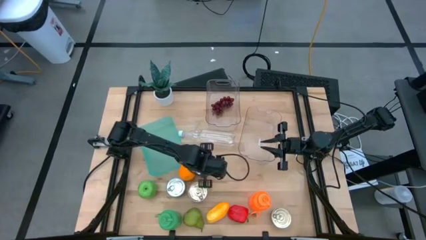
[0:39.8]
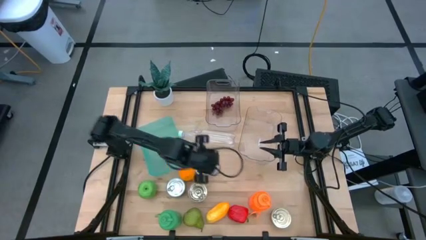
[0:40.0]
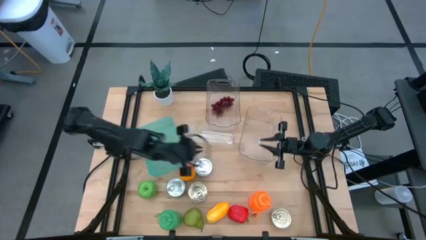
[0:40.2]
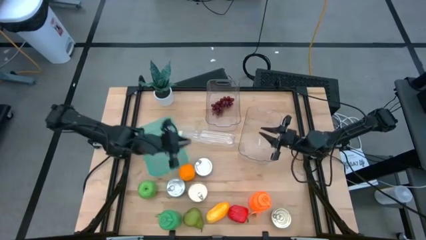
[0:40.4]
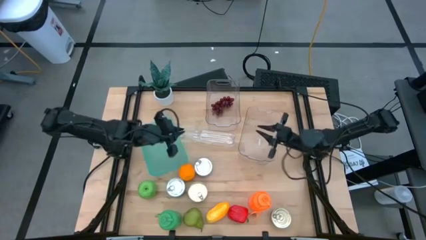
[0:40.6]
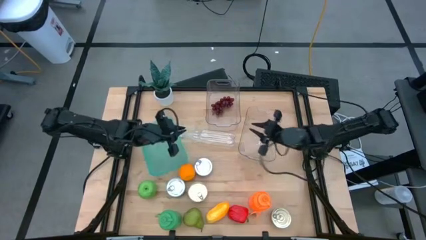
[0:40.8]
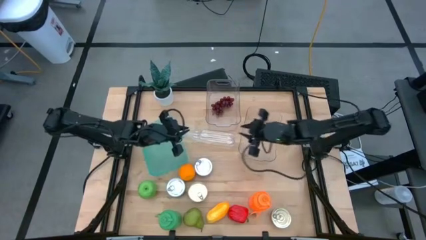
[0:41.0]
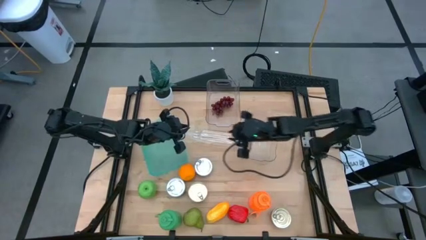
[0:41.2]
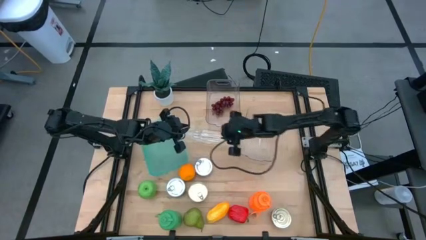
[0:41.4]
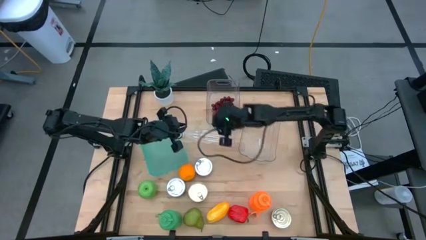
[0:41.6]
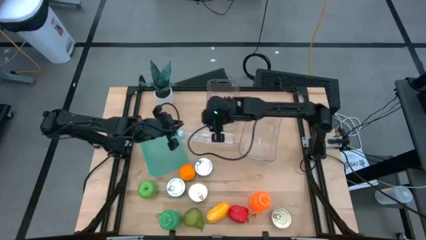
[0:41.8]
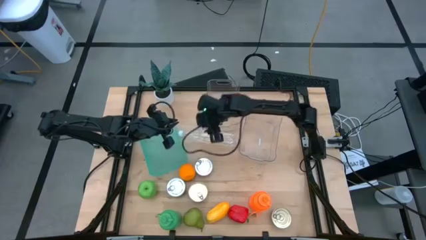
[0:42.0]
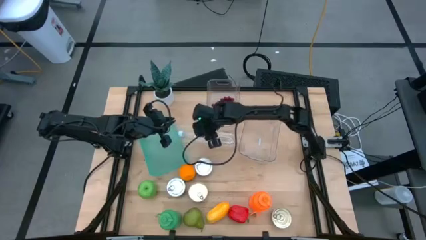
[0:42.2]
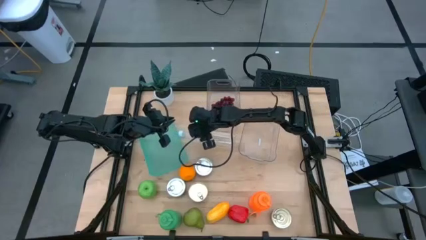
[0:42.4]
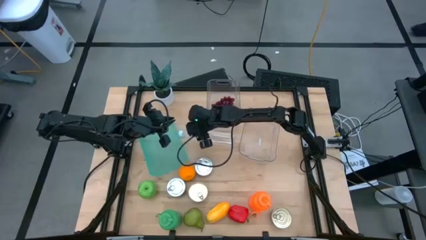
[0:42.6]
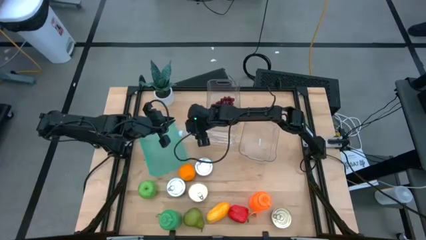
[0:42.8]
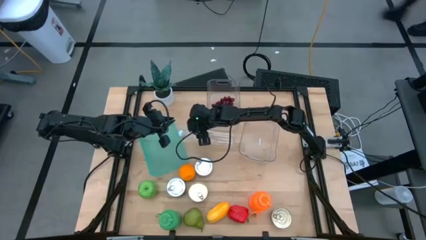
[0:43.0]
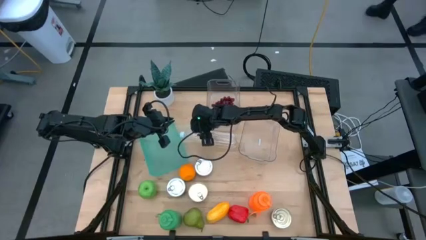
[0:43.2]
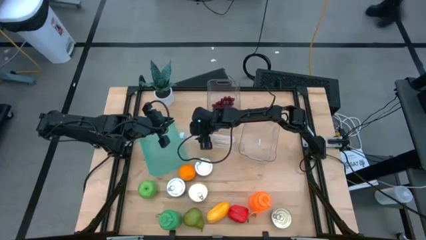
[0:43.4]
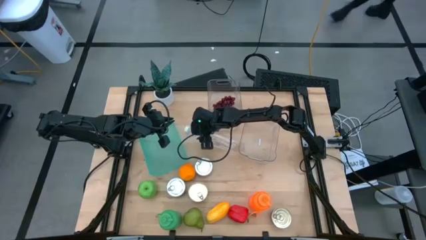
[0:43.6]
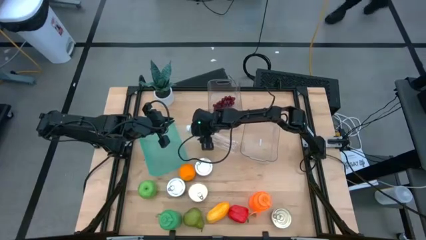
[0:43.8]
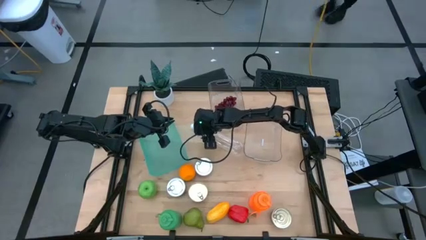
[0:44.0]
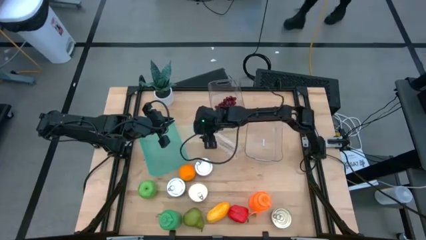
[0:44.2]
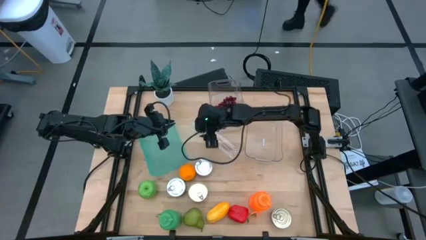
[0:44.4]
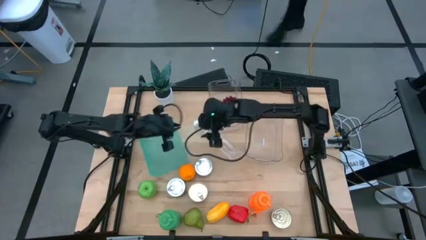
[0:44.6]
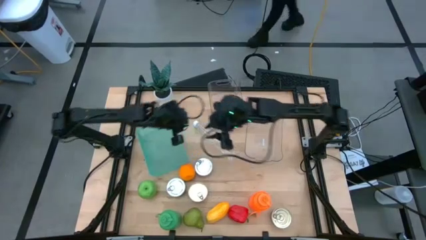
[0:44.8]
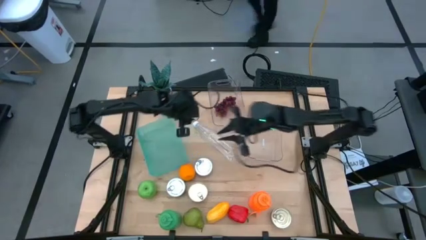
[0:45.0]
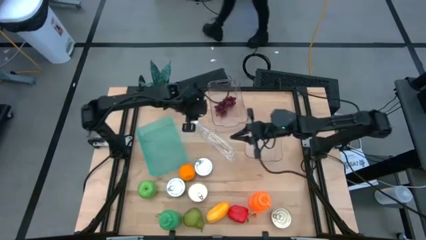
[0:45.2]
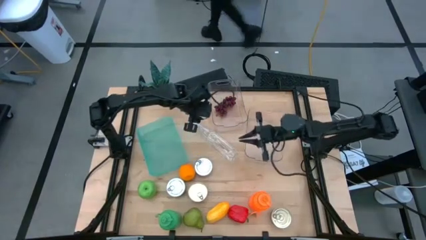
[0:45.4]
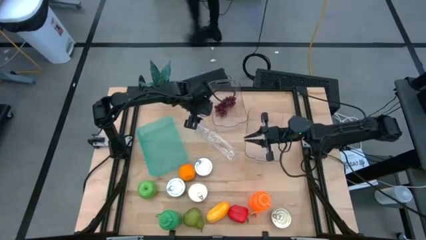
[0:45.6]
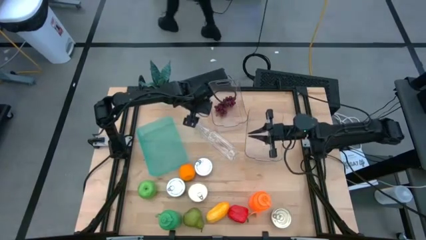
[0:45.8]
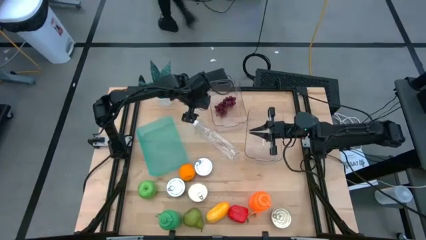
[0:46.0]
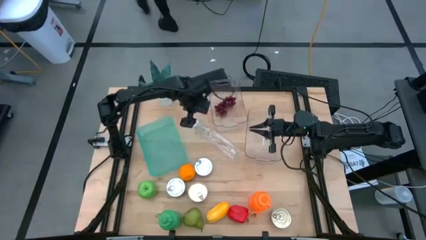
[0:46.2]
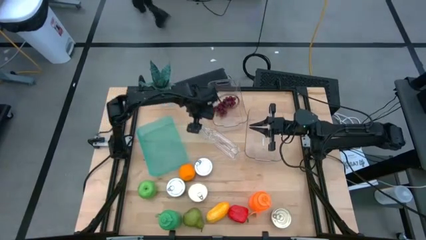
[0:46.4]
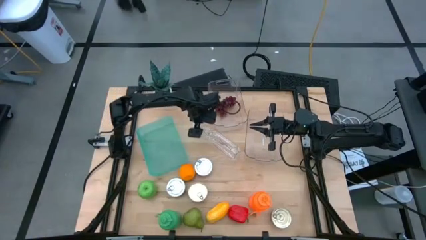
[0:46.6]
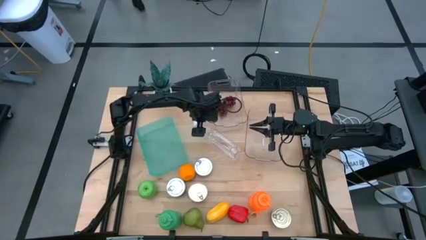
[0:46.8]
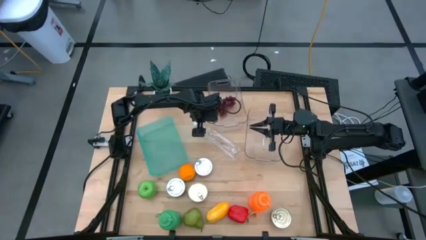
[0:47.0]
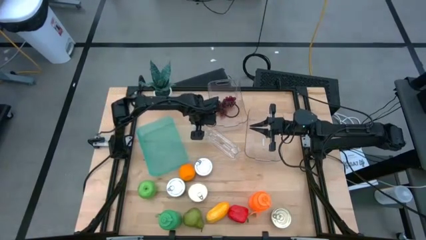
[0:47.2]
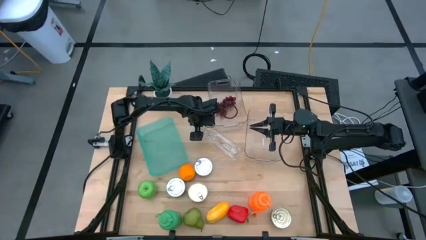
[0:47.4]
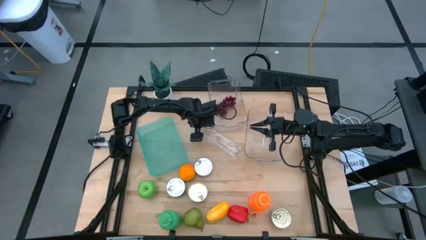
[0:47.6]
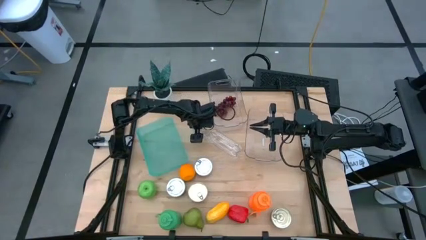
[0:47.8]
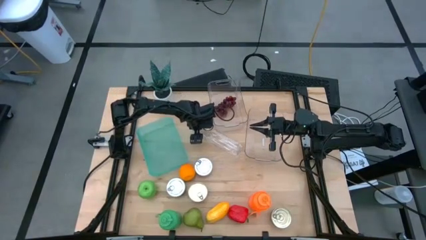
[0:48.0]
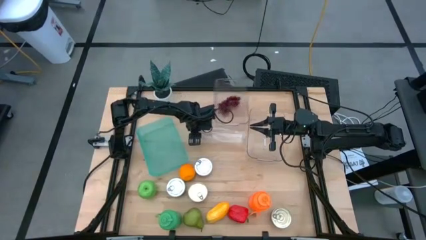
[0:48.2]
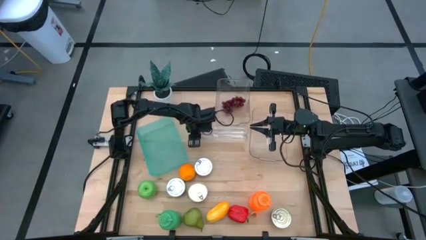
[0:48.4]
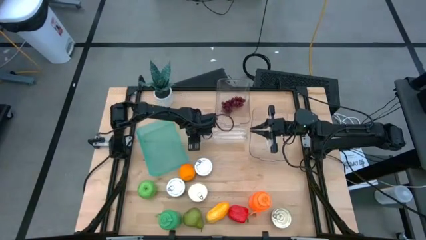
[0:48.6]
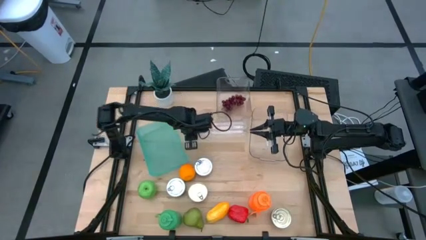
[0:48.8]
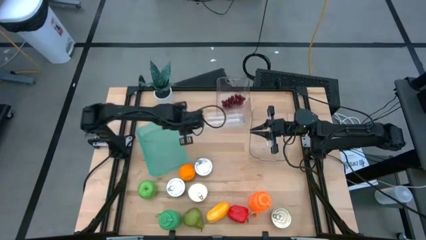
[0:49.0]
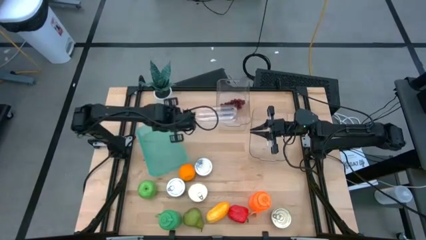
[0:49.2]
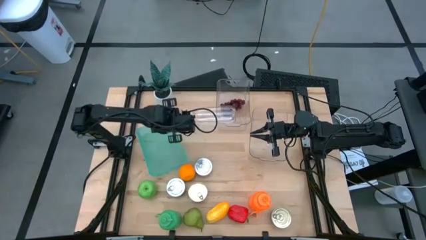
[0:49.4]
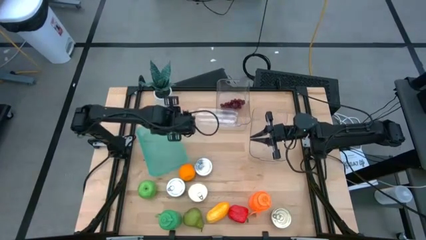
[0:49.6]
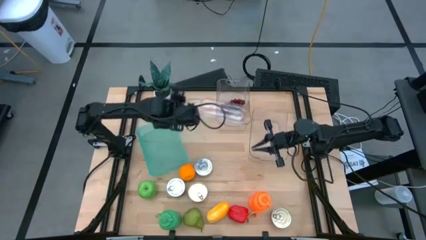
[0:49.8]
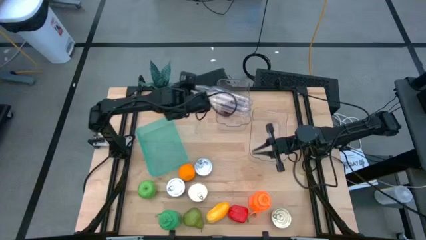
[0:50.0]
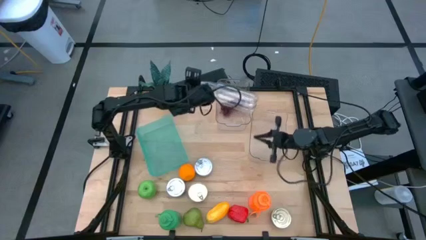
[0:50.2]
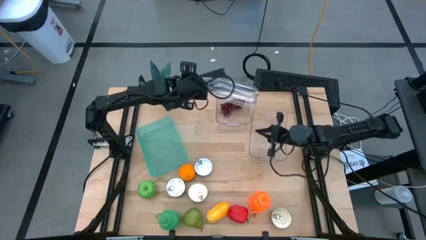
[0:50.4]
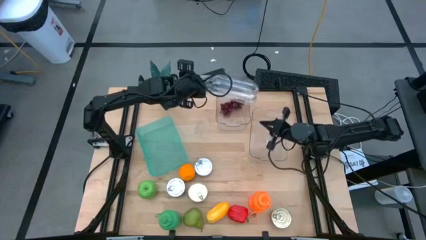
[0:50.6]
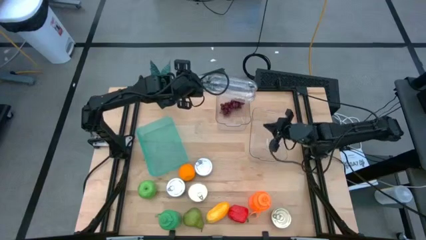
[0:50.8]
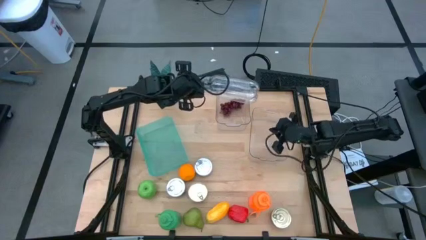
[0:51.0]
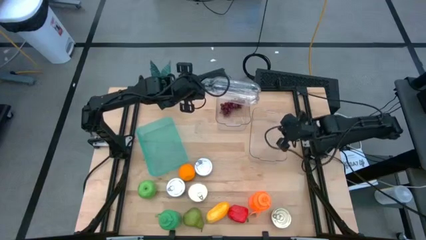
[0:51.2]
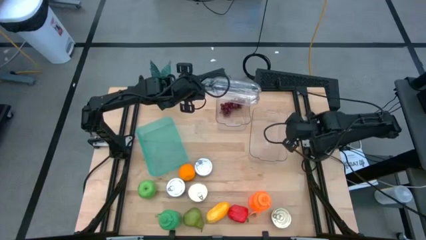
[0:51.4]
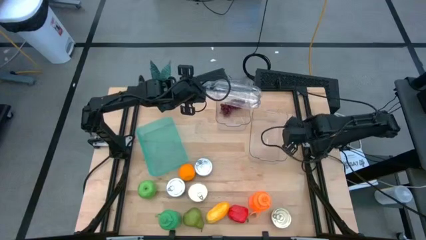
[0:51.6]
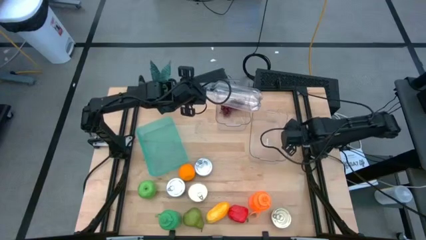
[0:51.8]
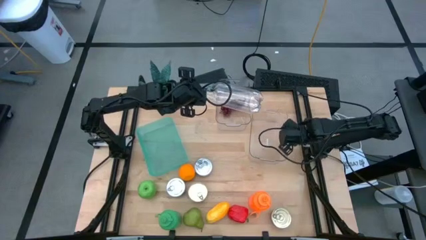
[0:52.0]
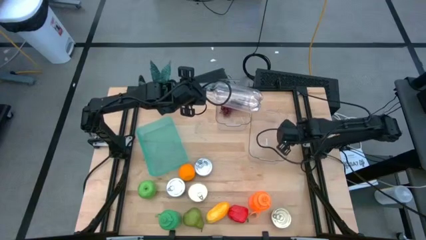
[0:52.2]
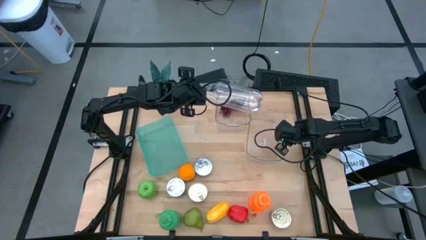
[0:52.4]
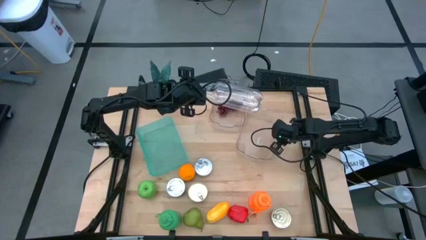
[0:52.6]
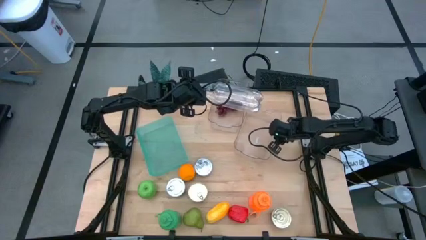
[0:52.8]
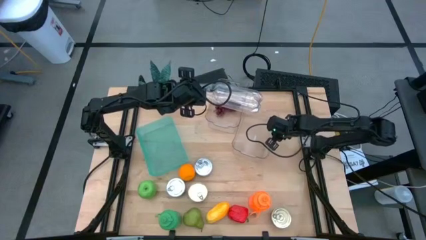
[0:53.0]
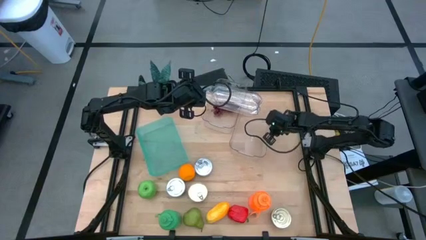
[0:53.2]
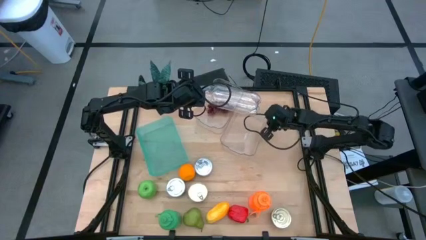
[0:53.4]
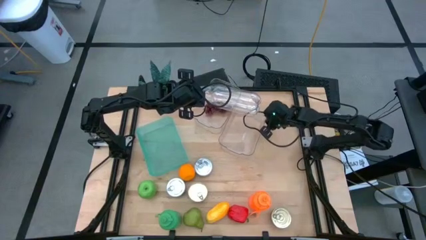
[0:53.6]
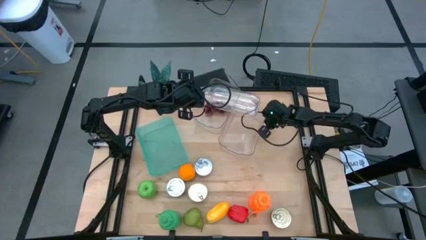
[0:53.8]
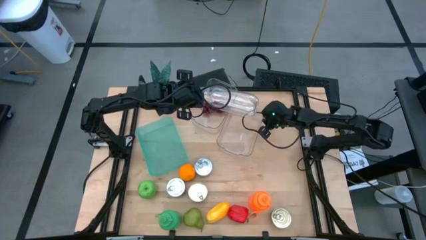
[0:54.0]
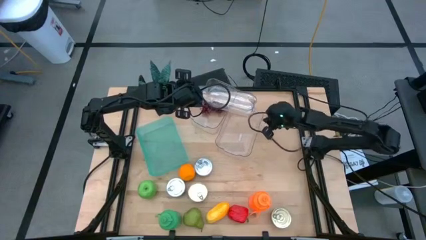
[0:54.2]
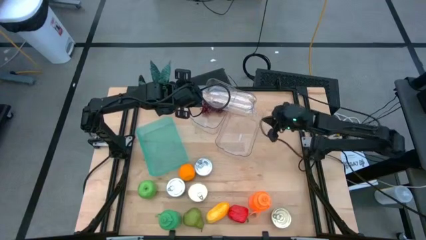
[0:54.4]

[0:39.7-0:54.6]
Task: Pick & Place Food Item
Put the transparent water bottle into the right transparent bin
